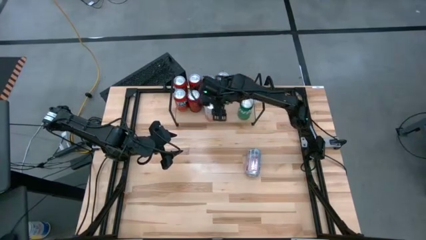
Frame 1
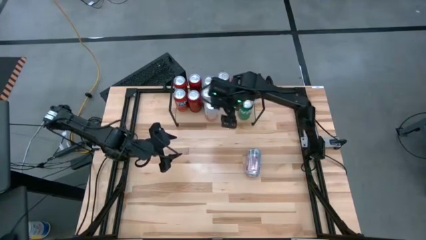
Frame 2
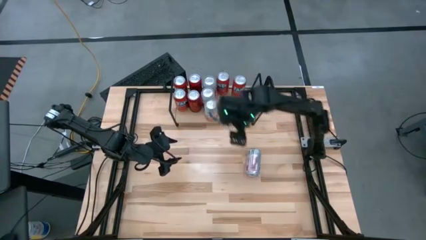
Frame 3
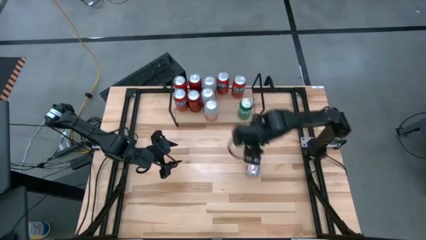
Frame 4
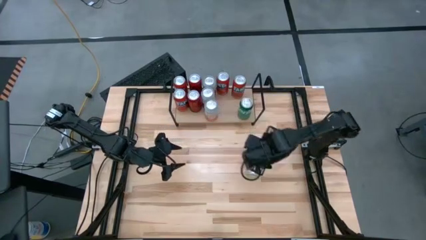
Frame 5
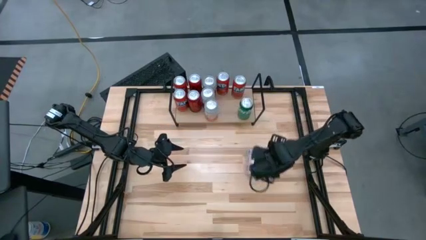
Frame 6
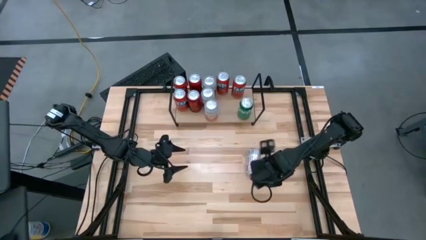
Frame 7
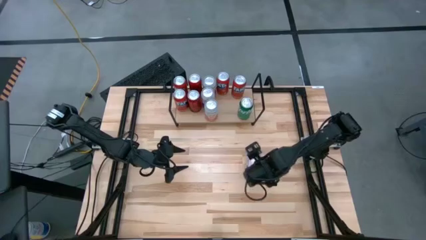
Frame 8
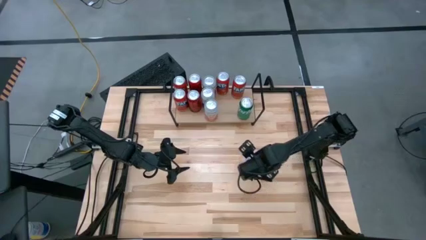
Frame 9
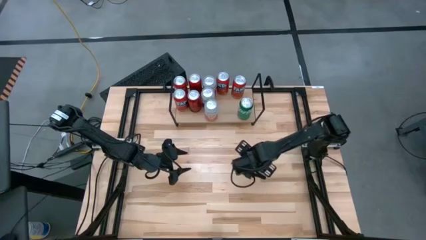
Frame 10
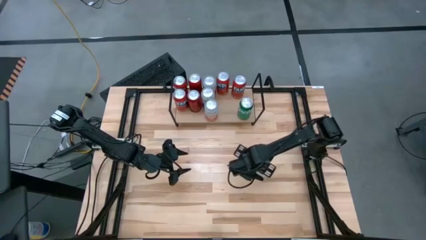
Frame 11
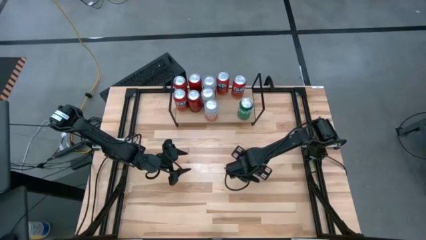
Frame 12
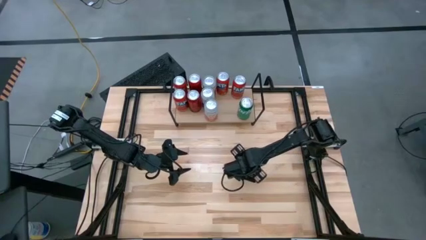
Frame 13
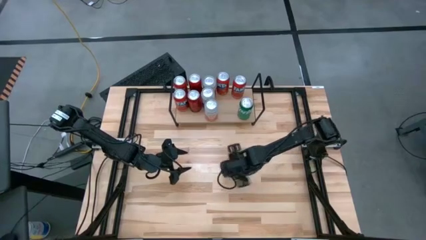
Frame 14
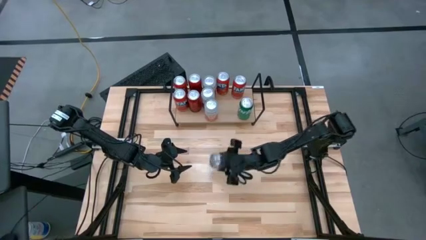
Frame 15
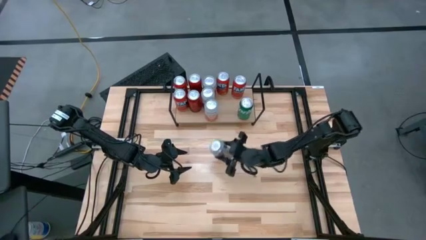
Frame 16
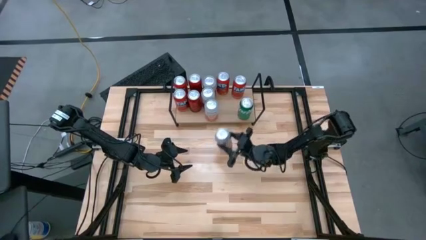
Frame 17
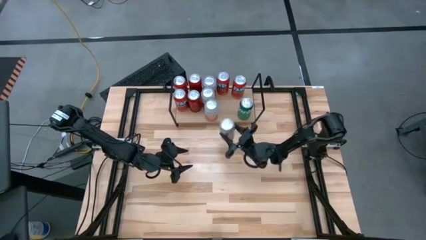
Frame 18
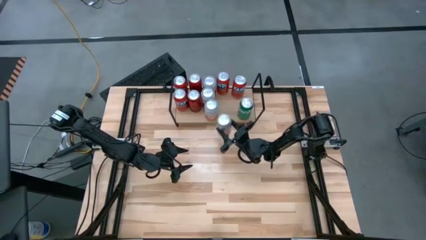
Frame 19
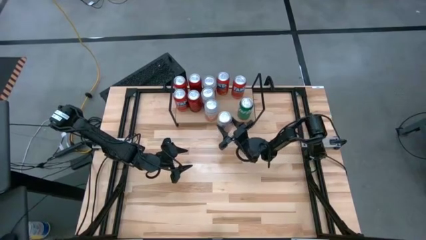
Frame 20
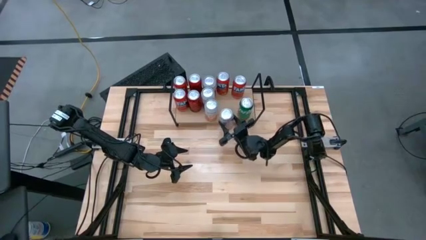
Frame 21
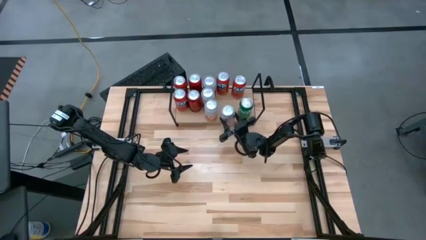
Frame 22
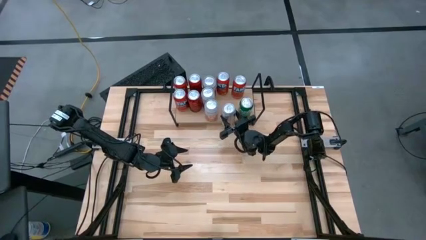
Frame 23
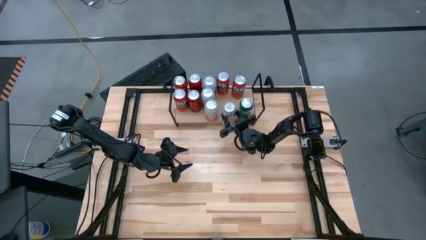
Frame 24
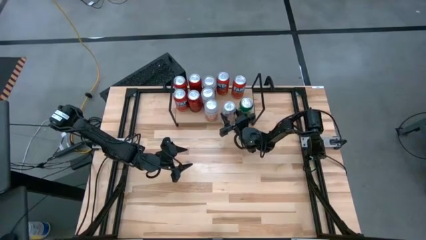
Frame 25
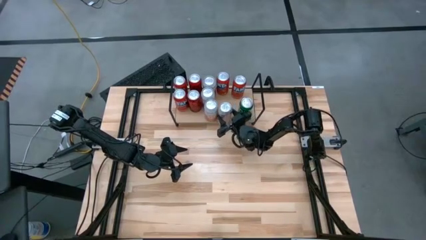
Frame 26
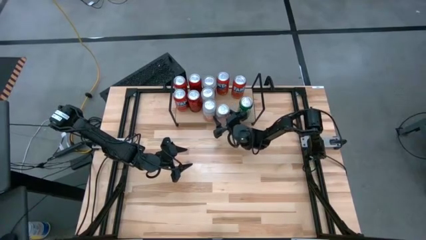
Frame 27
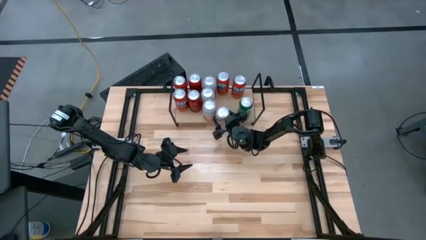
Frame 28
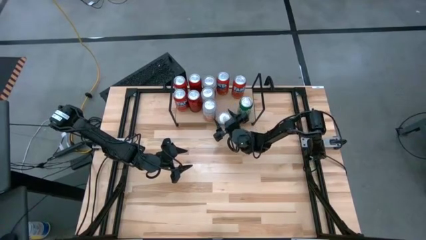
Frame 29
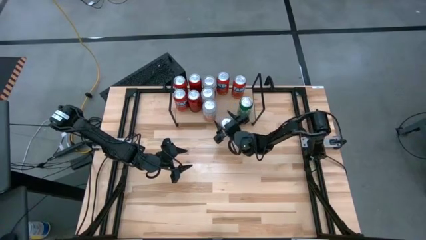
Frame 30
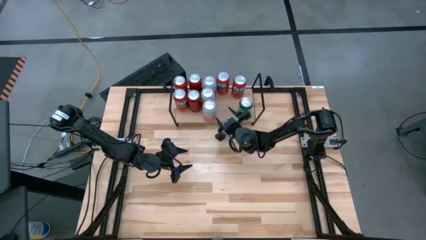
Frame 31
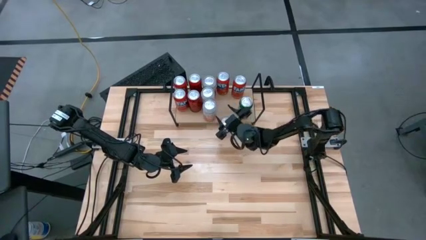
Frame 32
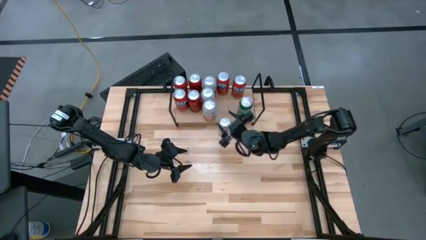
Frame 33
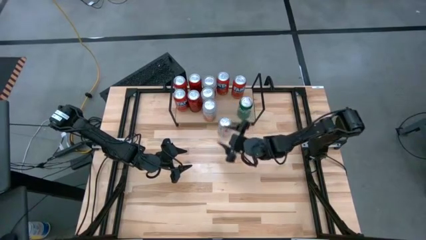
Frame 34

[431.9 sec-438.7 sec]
Task: Place canned beverage on shelf
Put the red silver soda can on the shelf

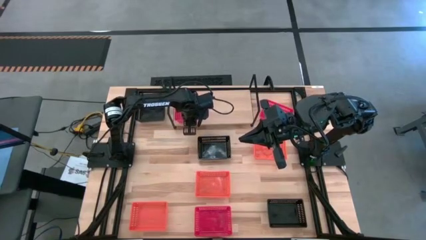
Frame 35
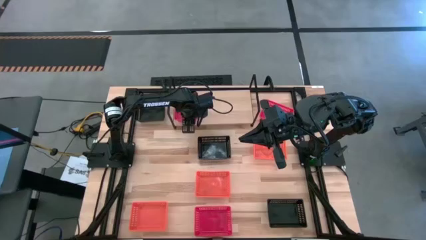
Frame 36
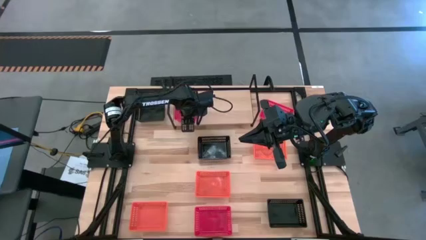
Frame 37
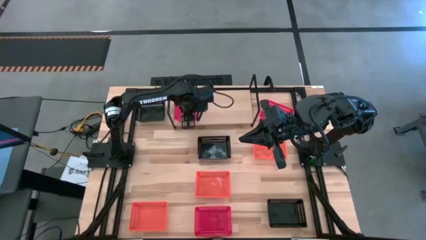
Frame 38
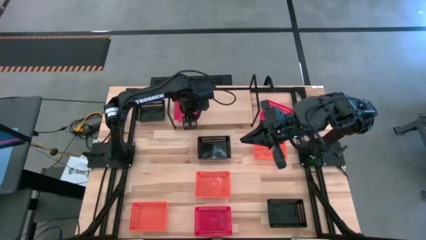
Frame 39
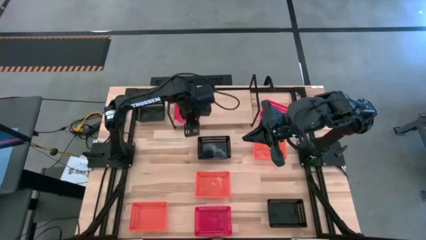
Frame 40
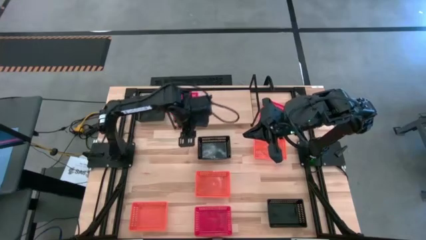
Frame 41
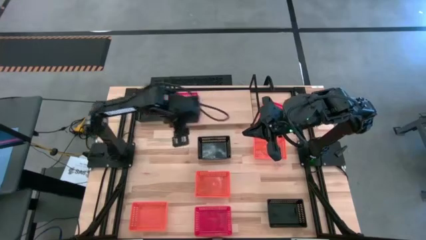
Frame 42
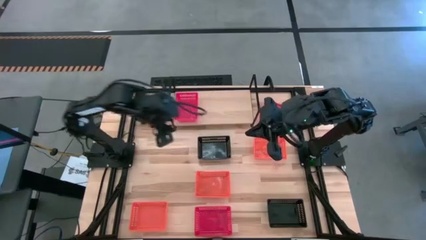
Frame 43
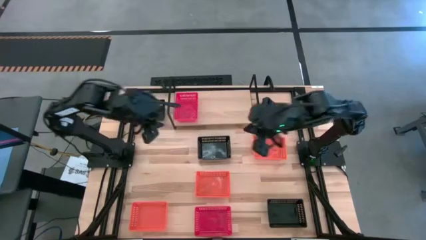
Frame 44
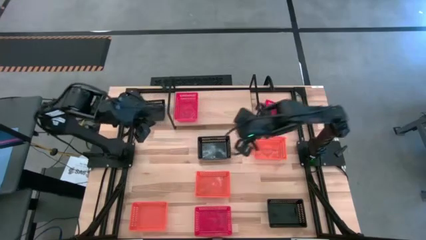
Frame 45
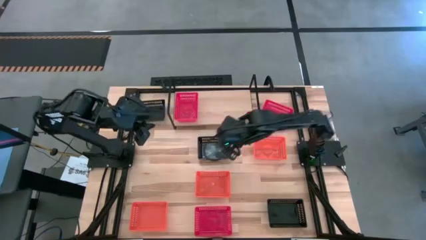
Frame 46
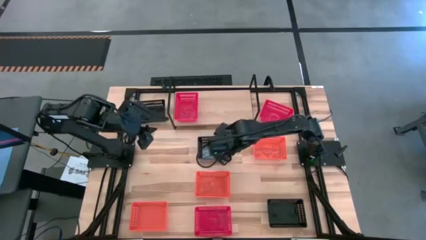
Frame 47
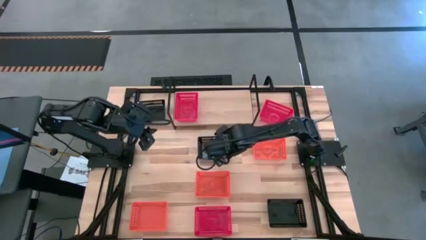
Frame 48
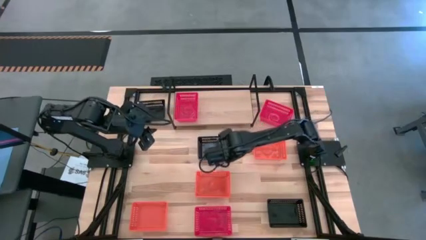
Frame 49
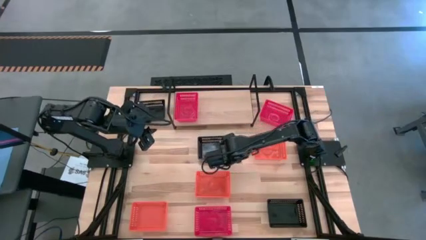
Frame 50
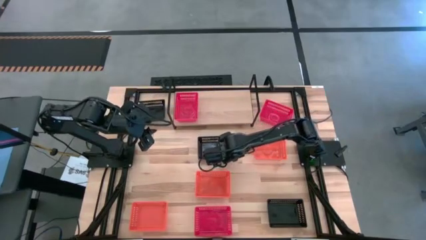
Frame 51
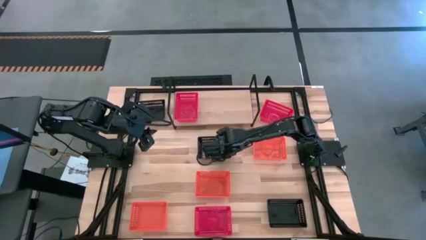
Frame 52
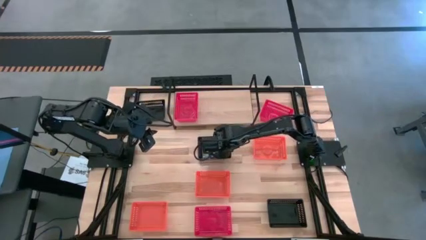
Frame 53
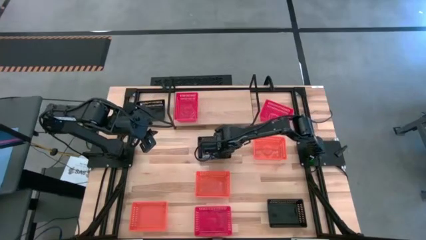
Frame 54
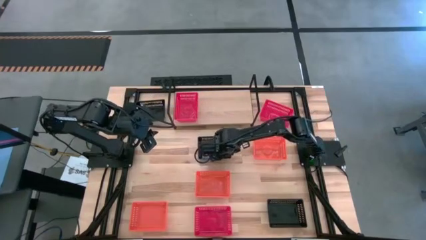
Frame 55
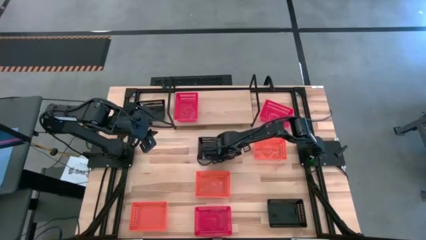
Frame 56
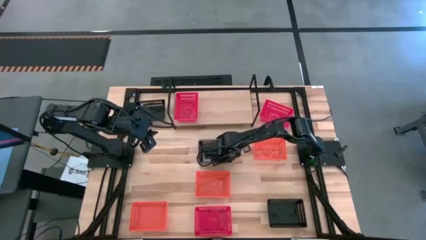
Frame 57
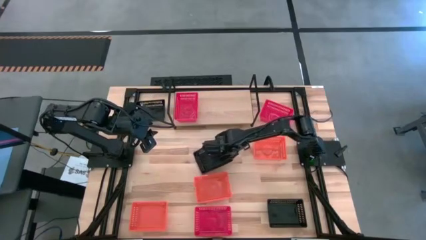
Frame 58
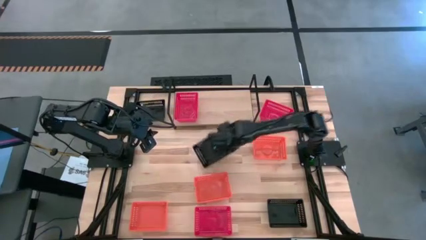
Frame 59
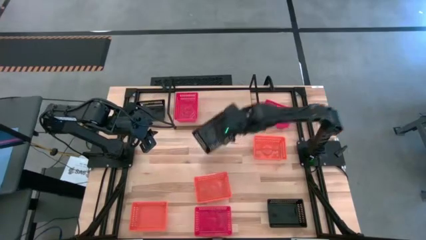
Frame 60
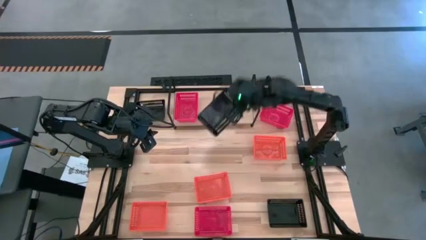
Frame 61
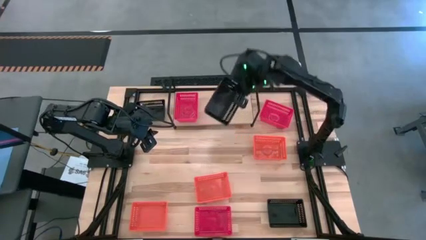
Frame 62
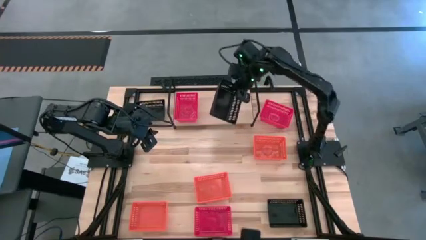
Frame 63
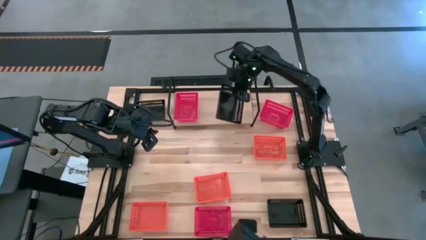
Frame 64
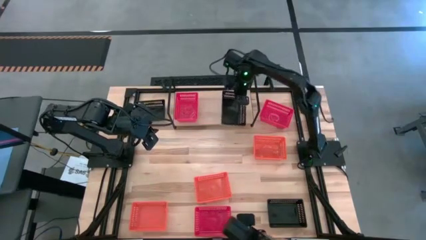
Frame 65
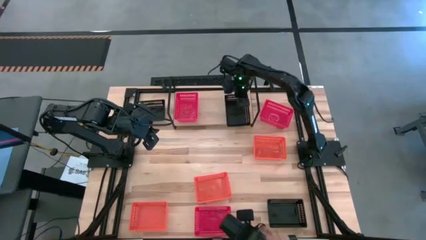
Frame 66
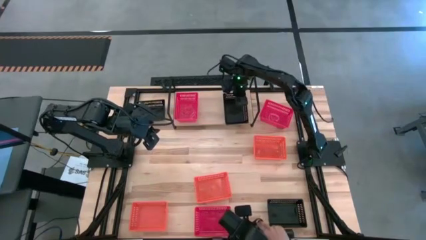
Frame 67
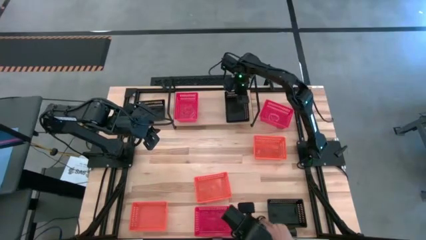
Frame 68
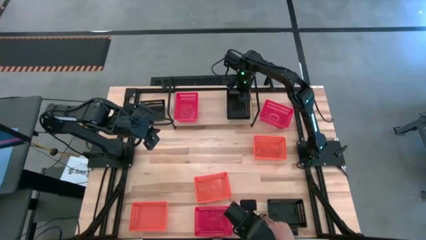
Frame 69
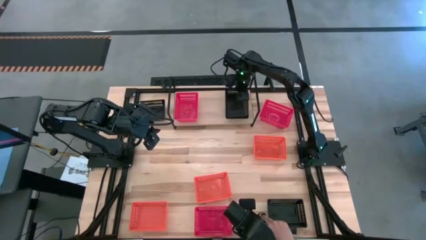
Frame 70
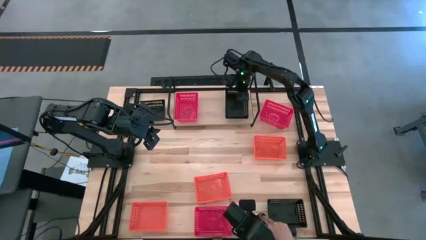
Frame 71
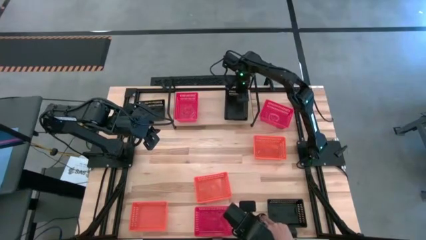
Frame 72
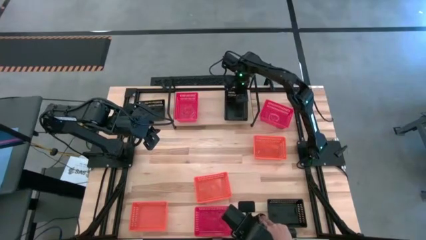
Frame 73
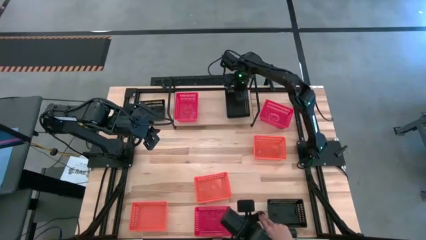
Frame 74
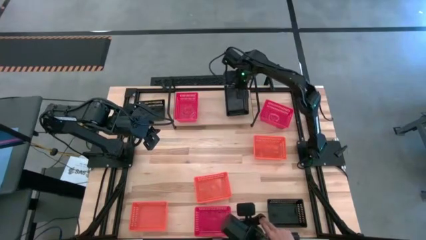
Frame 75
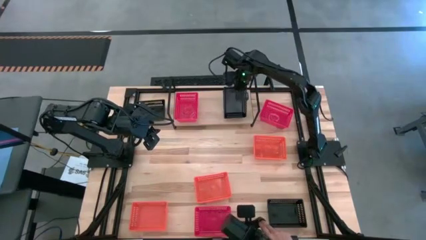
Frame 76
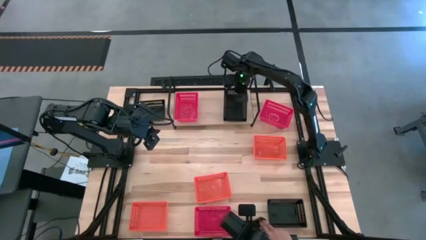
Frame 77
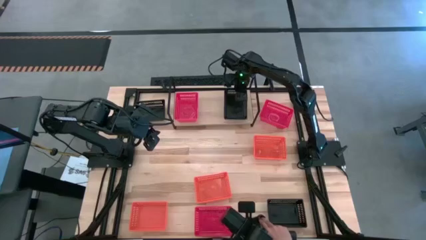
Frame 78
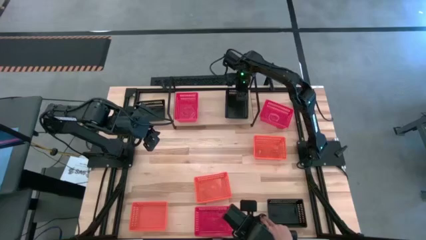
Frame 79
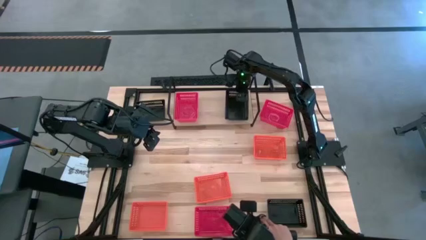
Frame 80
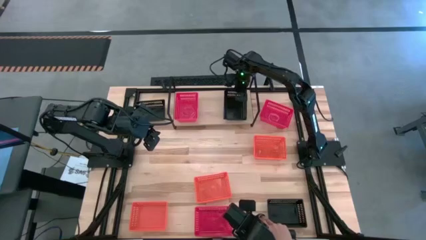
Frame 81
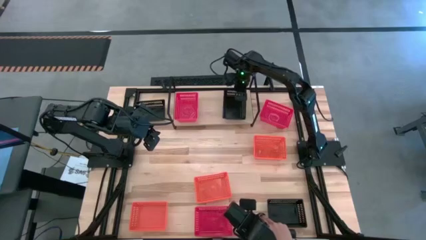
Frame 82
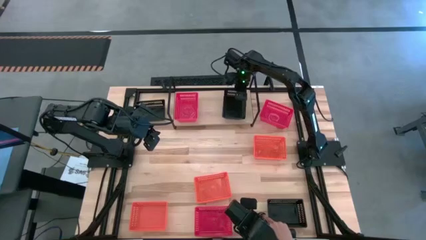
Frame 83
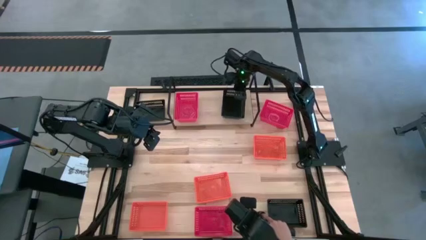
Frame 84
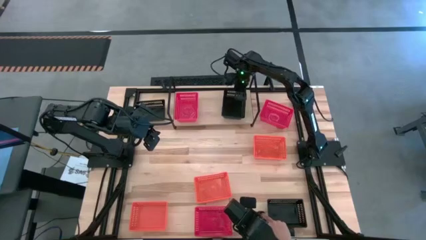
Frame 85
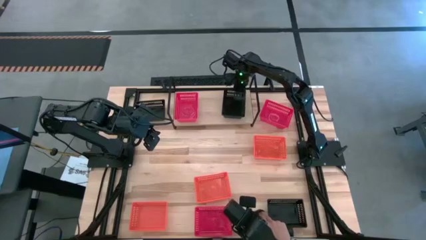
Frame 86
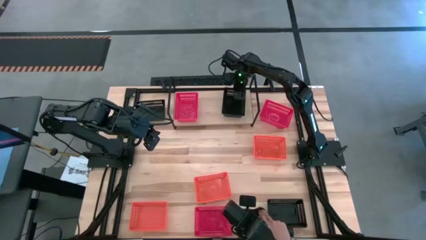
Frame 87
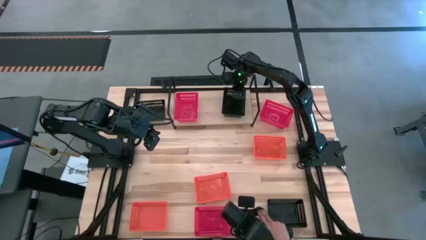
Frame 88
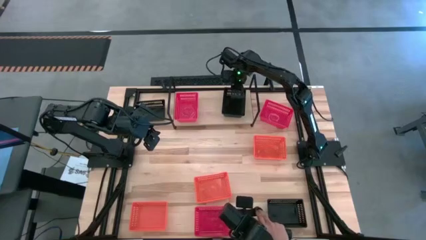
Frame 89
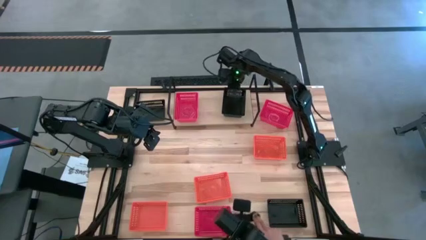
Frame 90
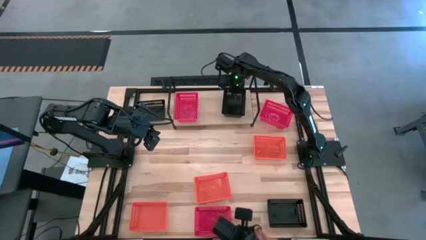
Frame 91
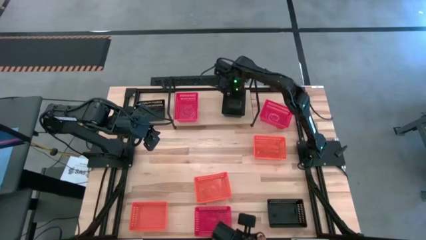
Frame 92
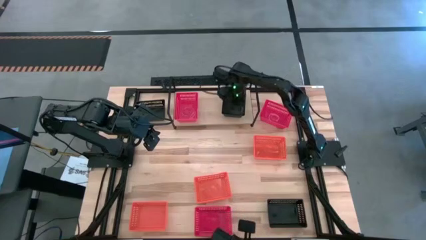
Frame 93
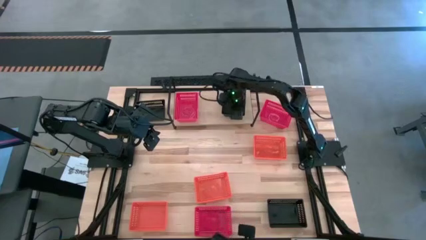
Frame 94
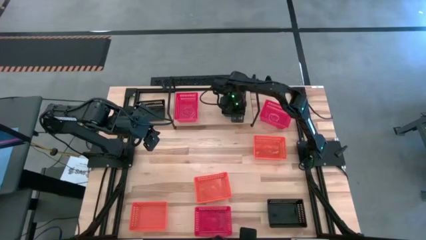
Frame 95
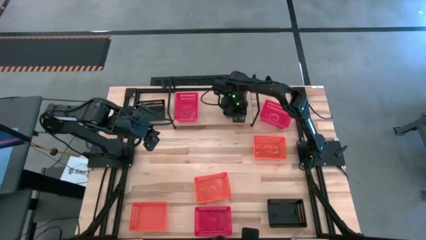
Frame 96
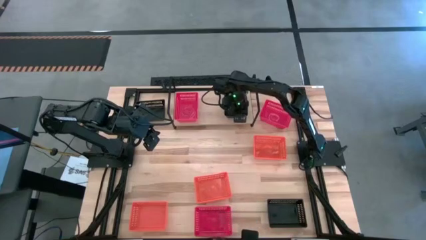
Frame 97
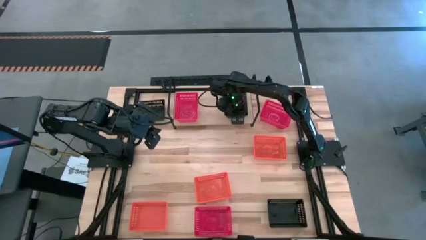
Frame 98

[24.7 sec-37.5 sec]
Task: Stack baskets on shelf by color
Put the middle black bin on the shelf
